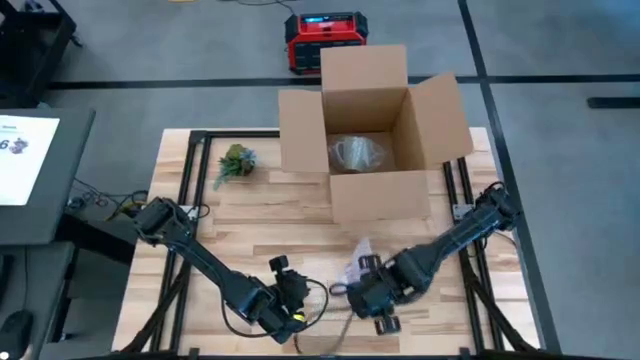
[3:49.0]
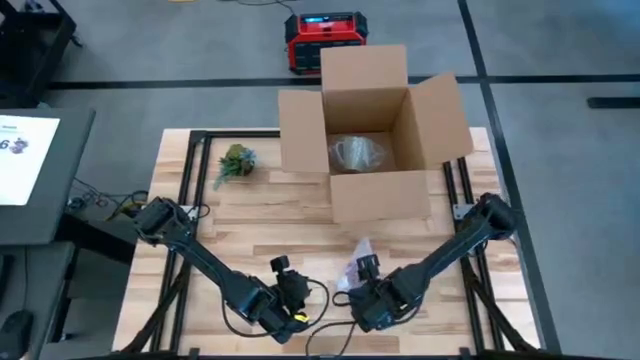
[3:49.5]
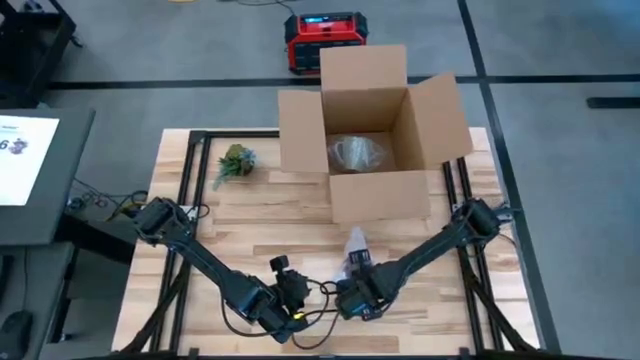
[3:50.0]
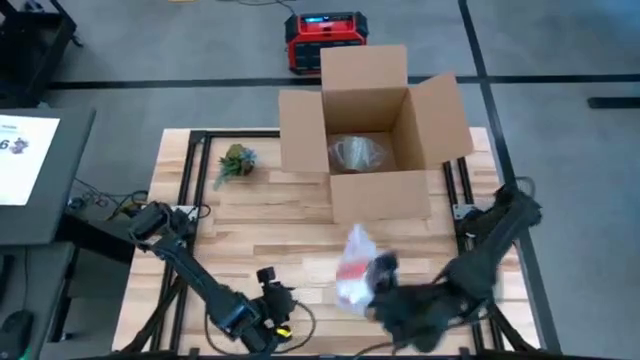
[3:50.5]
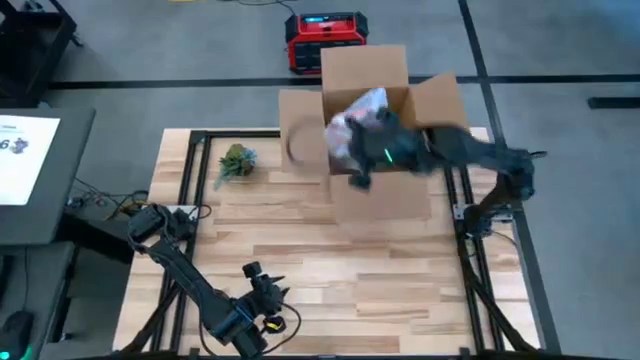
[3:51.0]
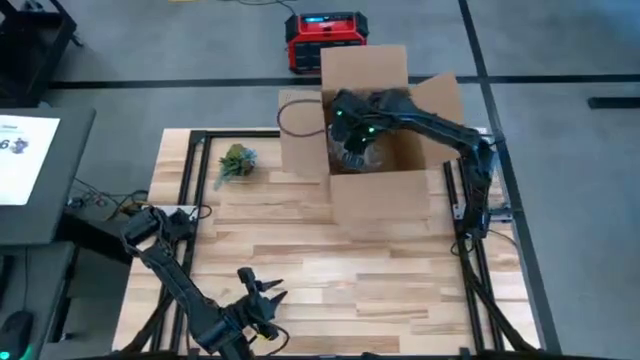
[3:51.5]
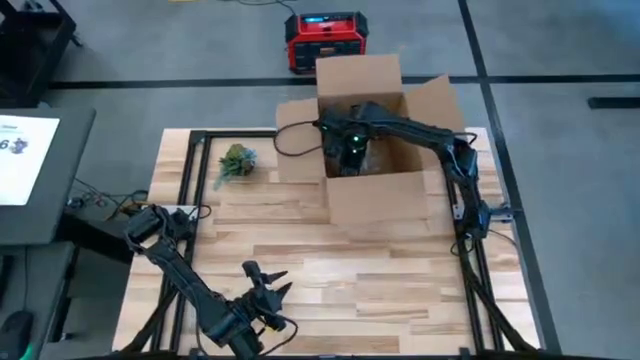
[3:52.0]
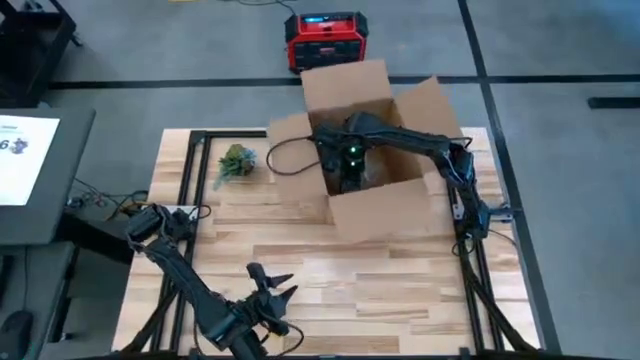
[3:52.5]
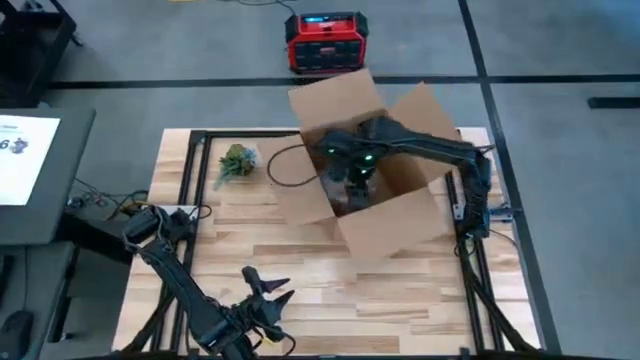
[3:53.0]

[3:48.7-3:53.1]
Task: wrap mug
Put the wrapped red mug into the brown cardboard box

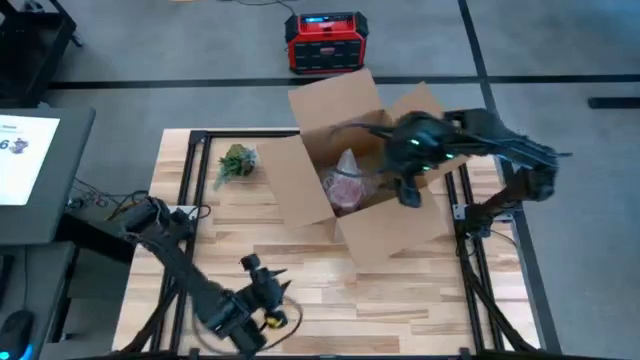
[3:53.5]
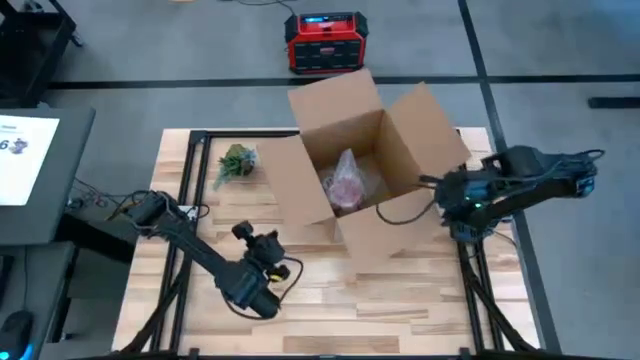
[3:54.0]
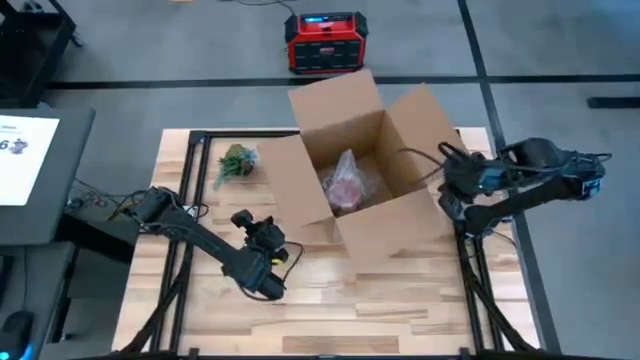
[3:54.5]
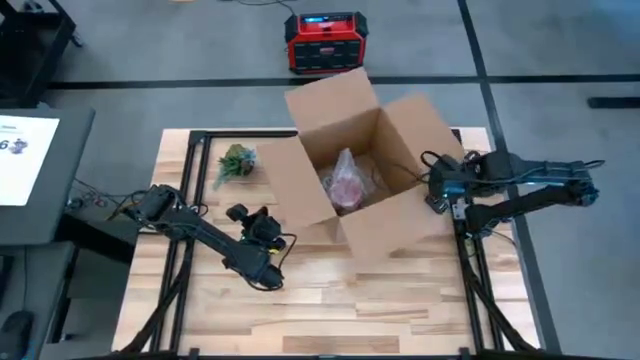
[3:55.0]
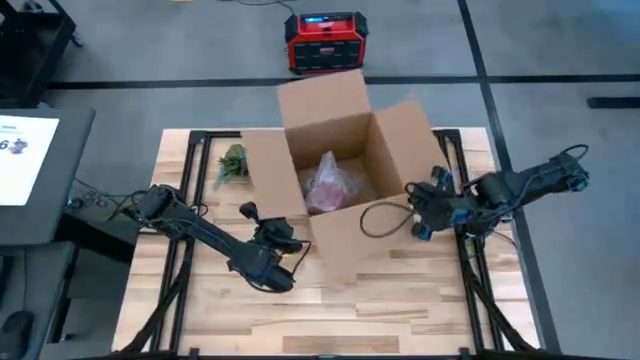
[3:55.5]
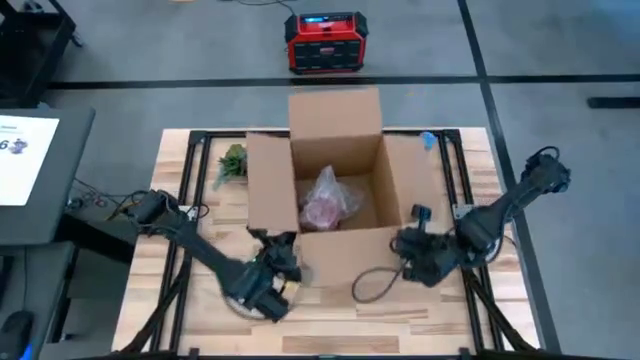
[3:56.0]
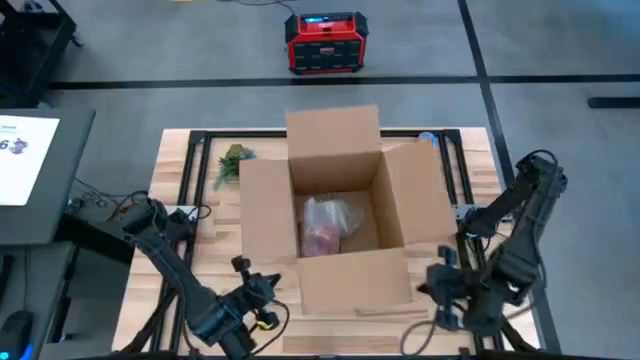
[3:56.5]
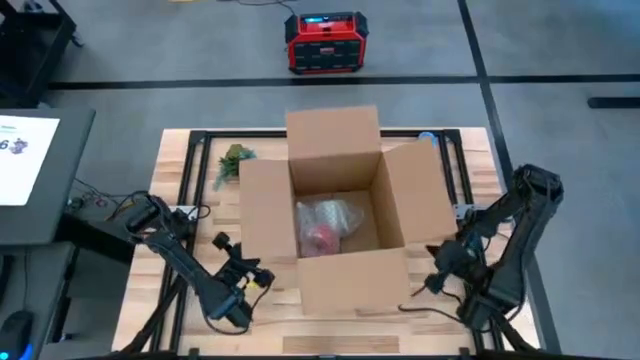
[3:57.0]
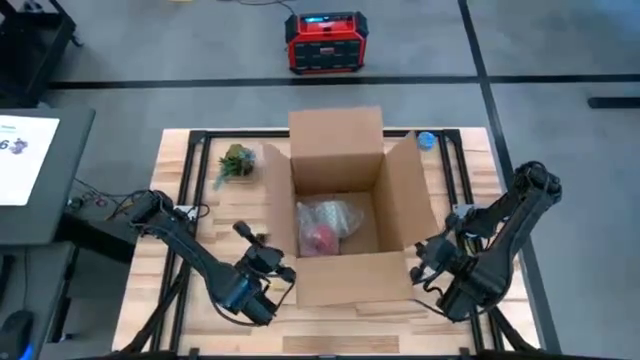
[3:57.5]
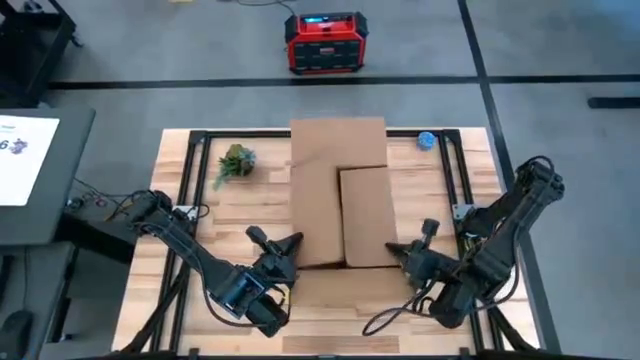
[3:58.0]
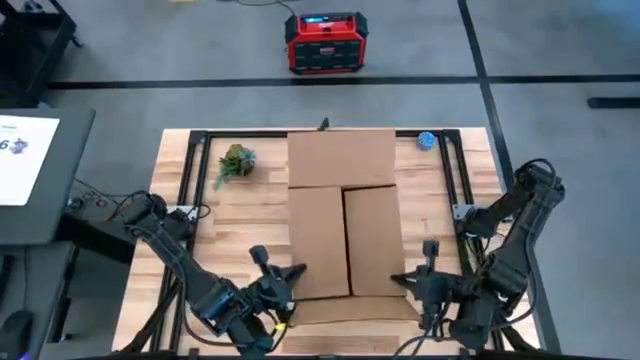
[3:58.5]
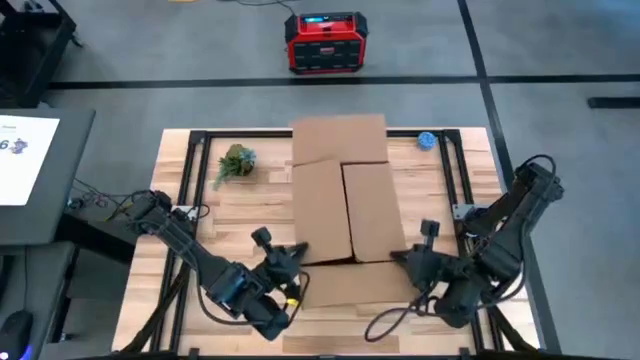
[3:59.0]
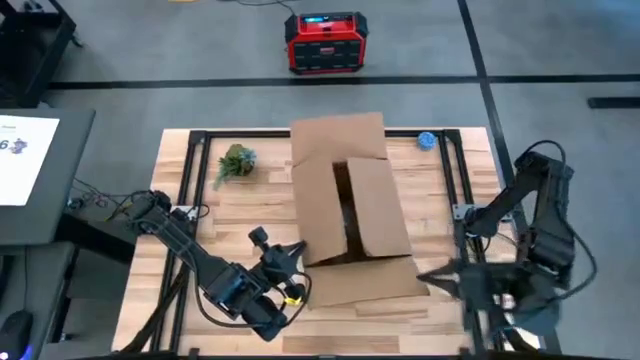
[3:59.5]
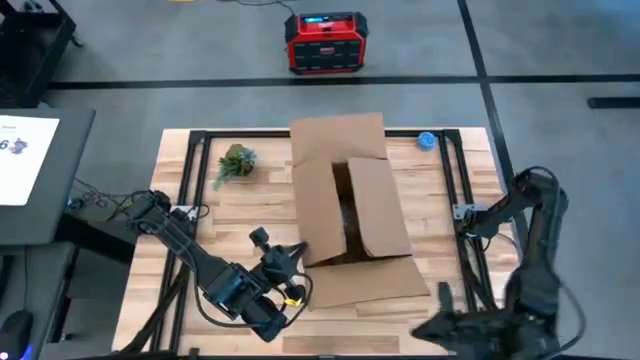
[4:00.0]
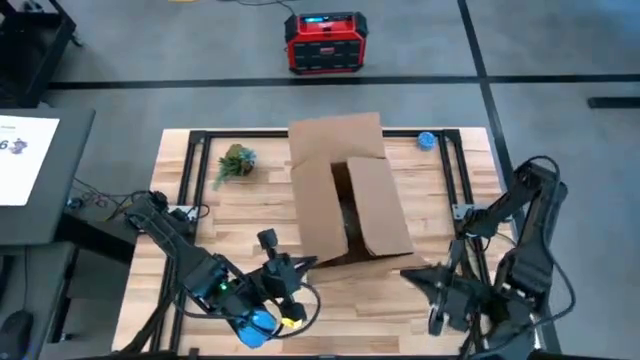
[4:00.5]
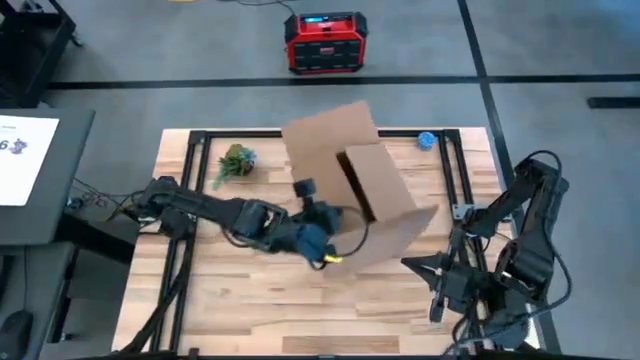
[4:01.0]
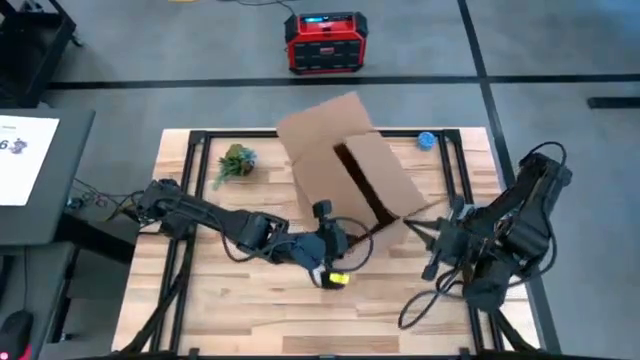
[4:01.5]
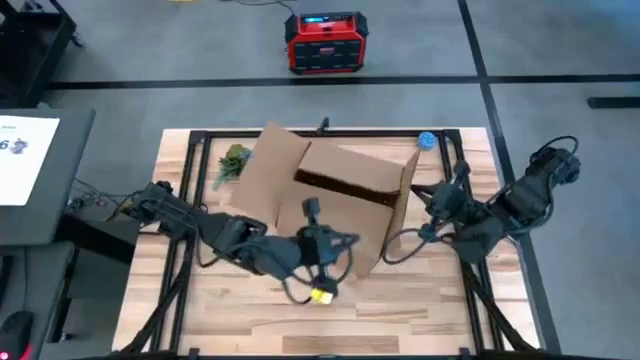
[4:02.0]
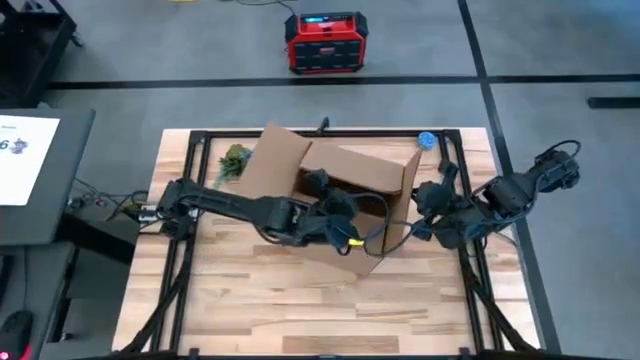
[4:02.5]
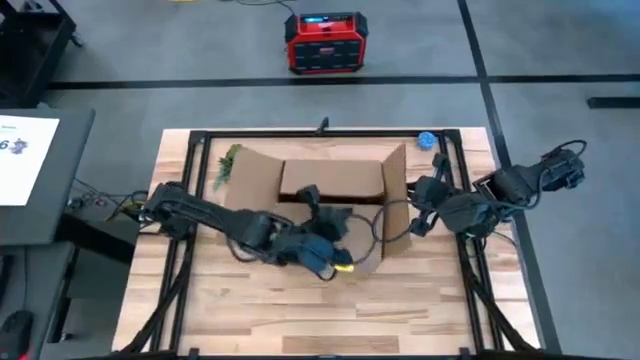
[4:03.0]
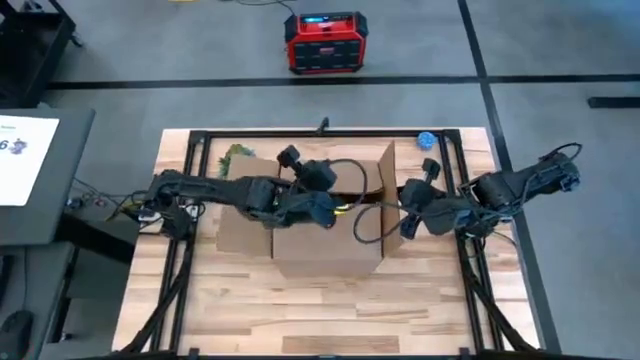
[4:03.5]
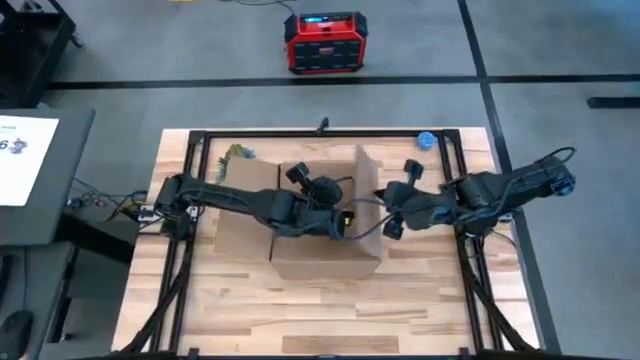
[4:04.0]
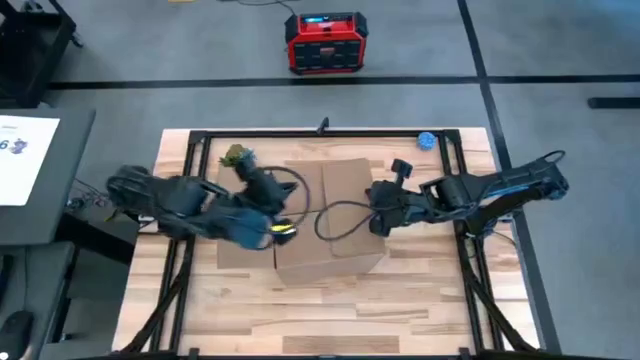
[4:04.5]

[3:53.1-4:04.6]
Close the brown cardboard box

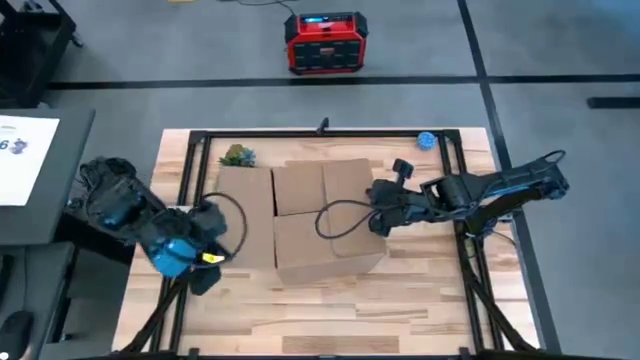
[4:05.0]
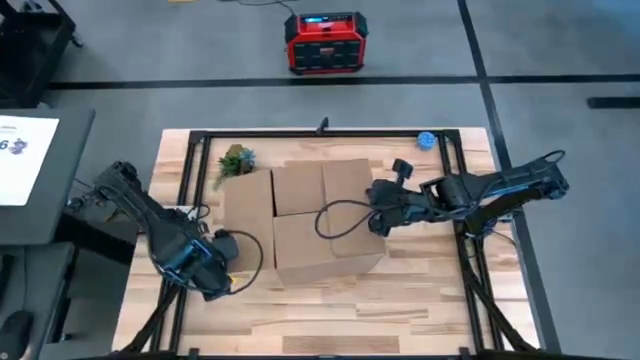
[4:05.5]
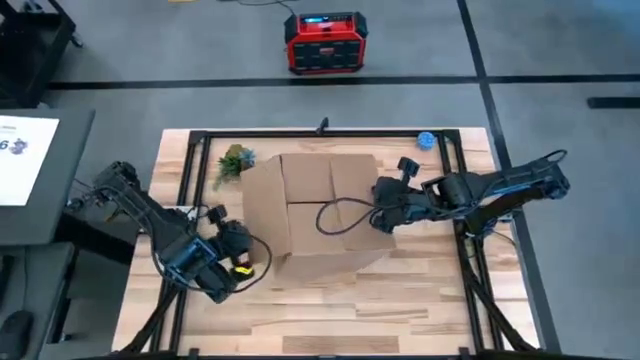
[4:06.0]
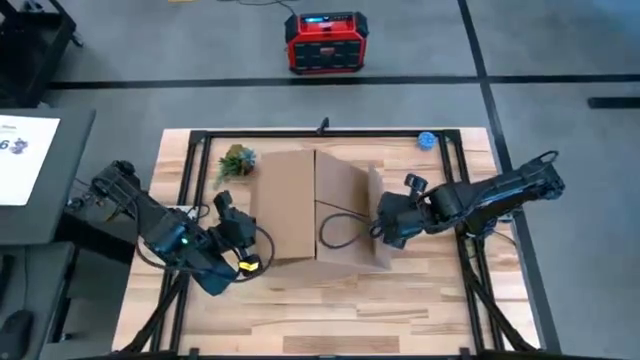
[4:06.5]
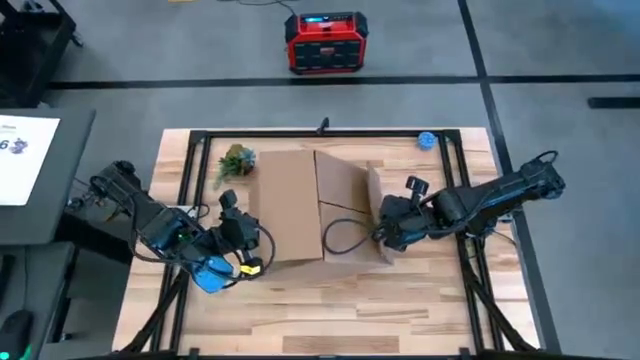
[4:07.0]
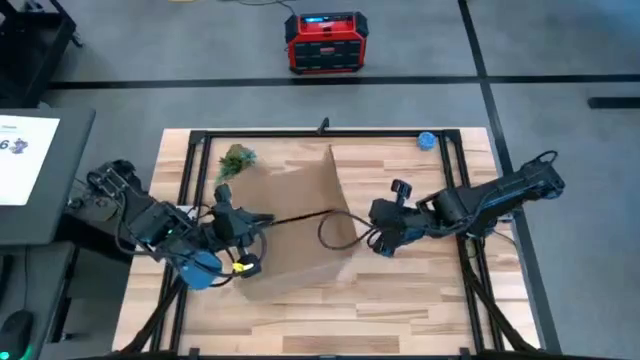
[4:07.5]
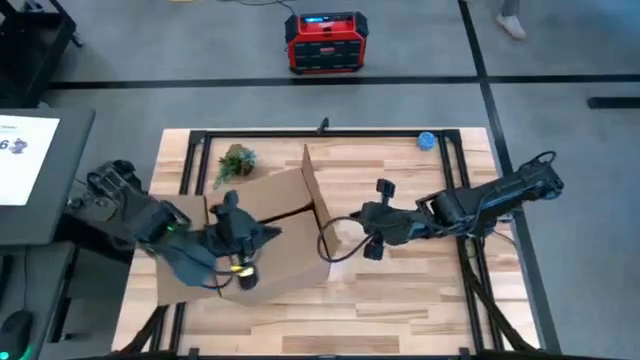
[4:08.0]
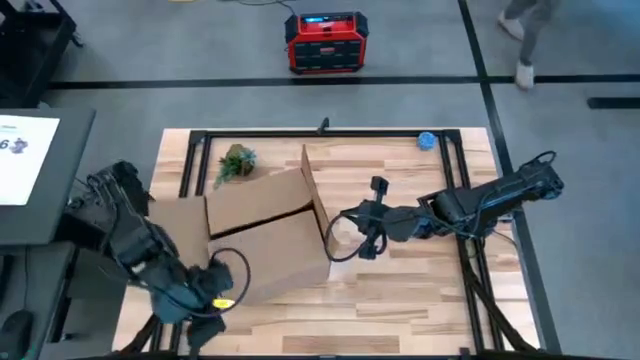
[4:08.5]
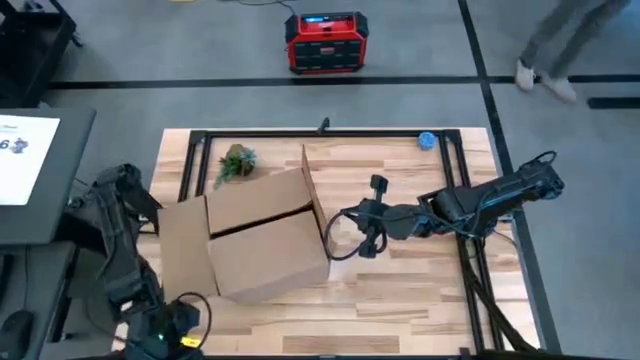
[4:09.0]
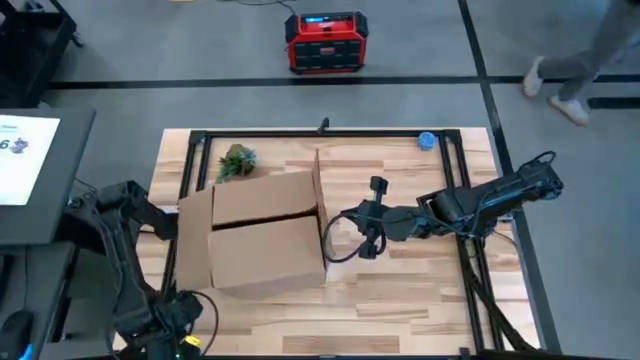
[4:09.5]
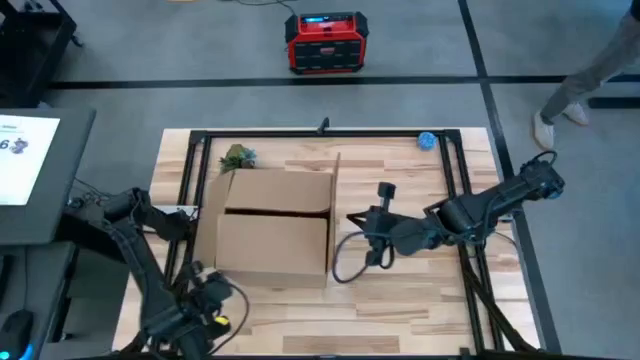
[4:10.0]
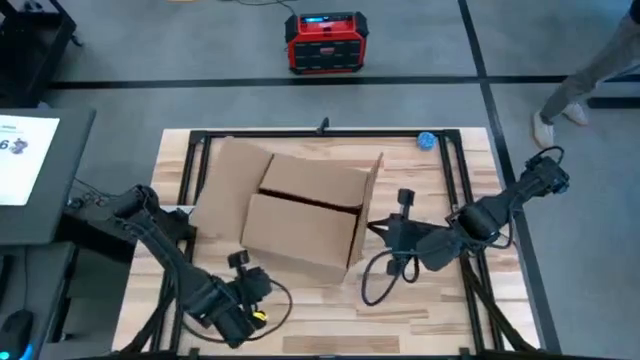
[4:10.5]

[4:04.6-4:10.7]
Close the brown cardboard box
